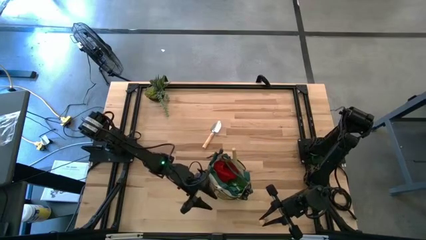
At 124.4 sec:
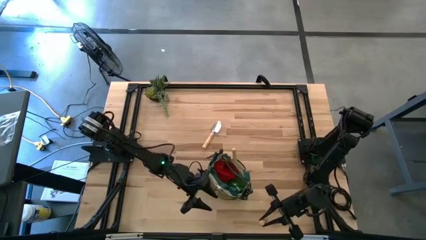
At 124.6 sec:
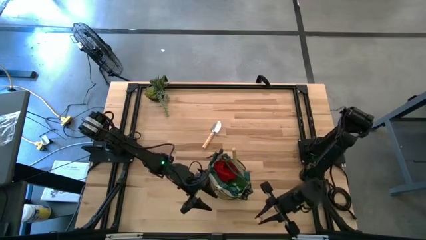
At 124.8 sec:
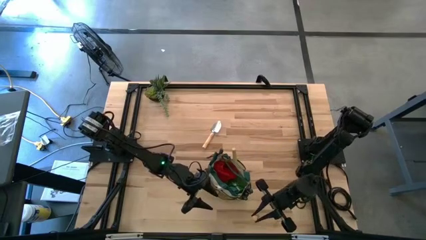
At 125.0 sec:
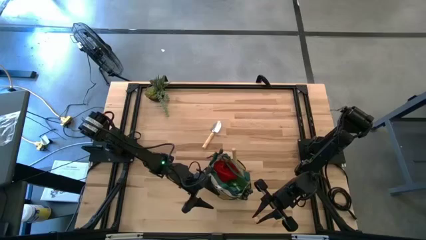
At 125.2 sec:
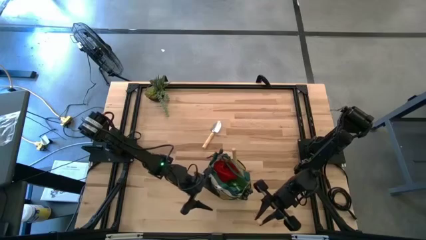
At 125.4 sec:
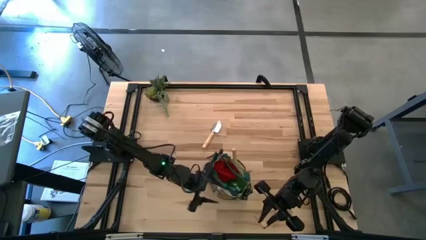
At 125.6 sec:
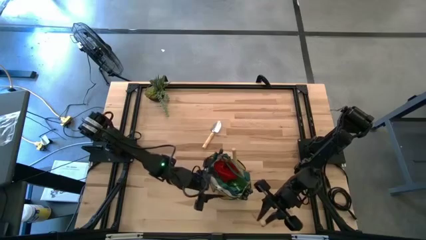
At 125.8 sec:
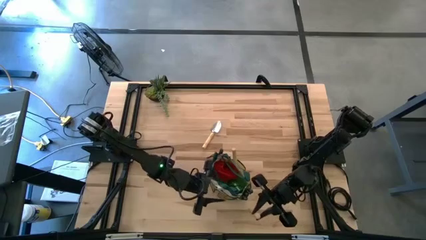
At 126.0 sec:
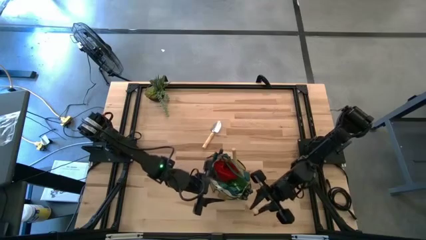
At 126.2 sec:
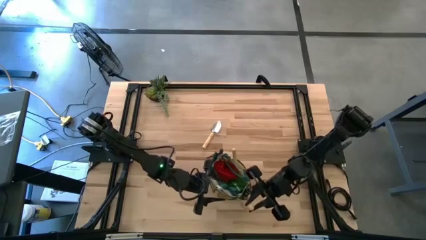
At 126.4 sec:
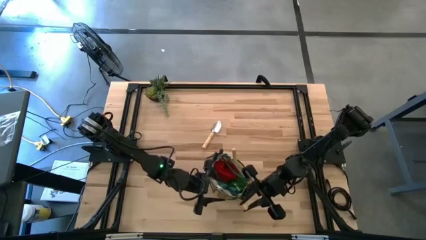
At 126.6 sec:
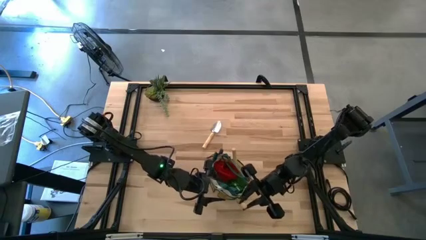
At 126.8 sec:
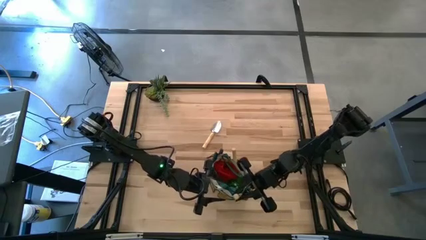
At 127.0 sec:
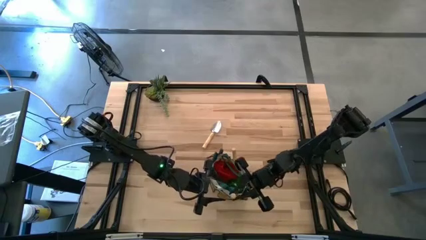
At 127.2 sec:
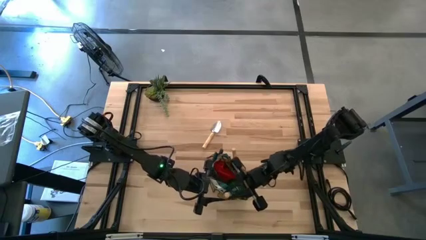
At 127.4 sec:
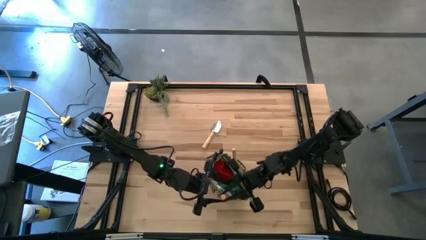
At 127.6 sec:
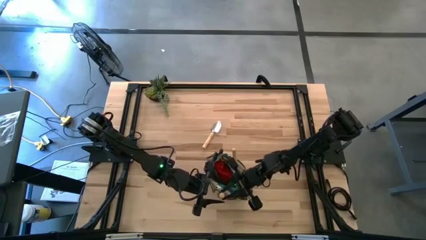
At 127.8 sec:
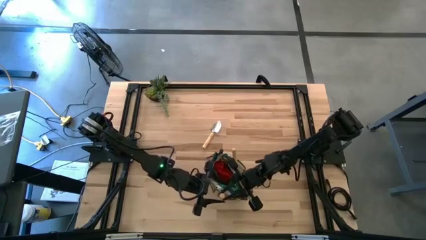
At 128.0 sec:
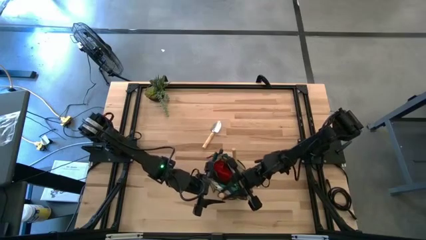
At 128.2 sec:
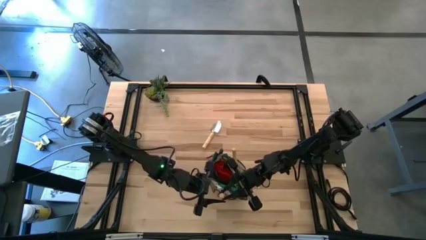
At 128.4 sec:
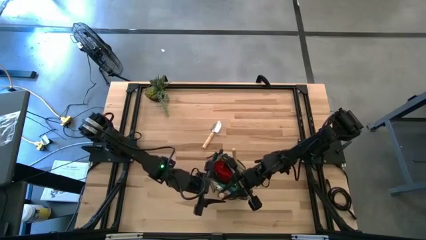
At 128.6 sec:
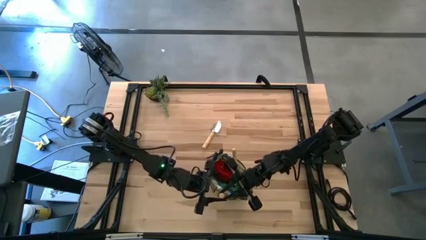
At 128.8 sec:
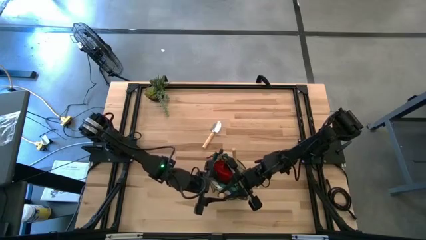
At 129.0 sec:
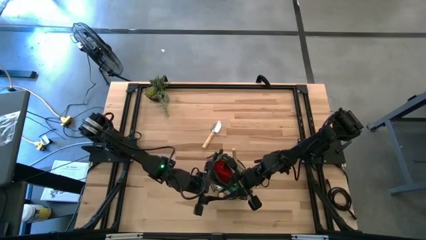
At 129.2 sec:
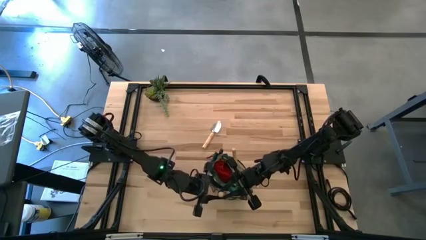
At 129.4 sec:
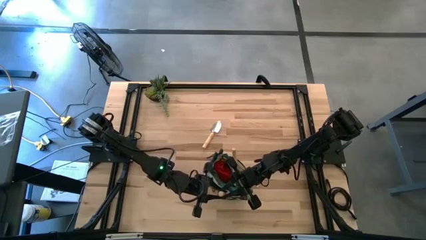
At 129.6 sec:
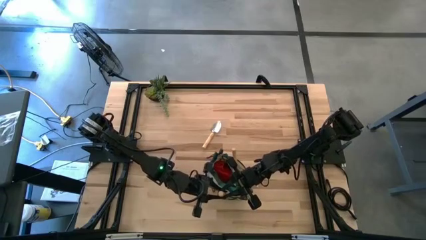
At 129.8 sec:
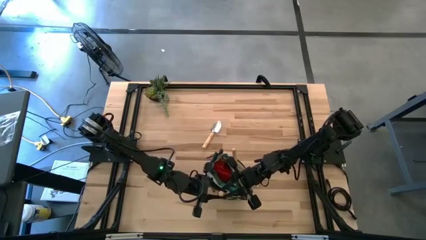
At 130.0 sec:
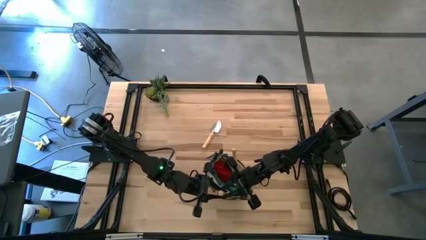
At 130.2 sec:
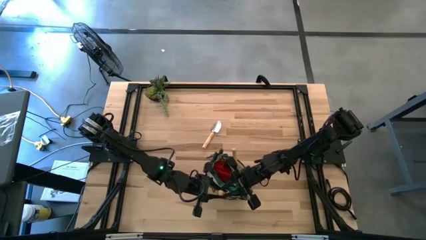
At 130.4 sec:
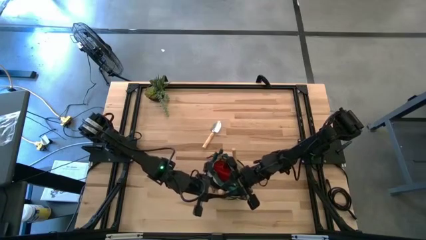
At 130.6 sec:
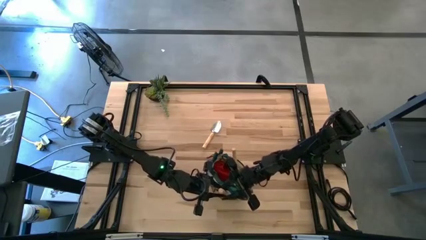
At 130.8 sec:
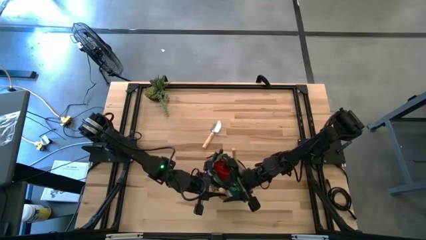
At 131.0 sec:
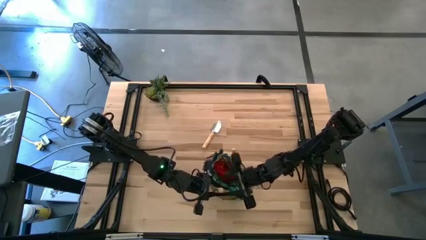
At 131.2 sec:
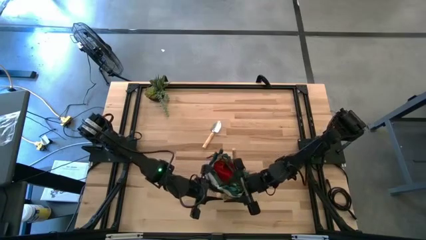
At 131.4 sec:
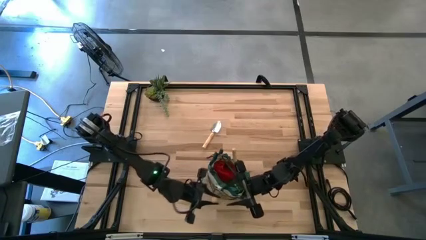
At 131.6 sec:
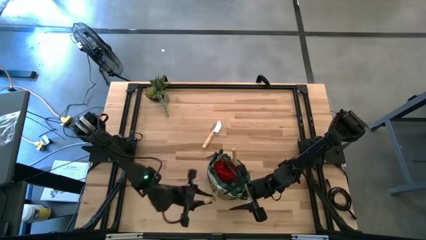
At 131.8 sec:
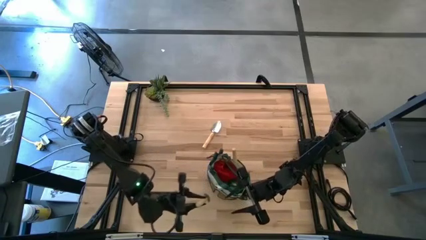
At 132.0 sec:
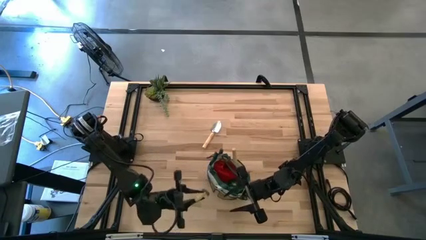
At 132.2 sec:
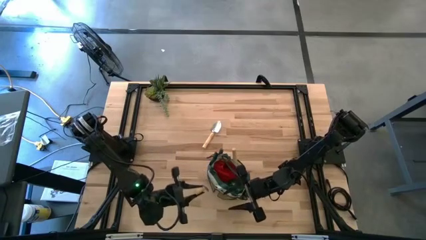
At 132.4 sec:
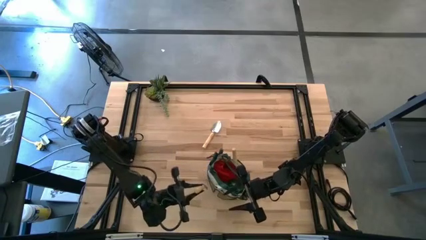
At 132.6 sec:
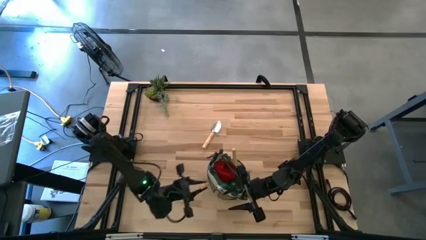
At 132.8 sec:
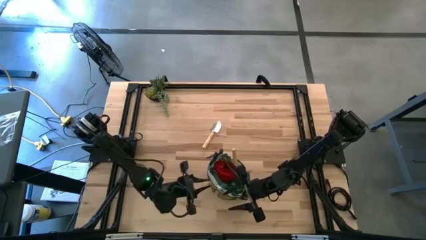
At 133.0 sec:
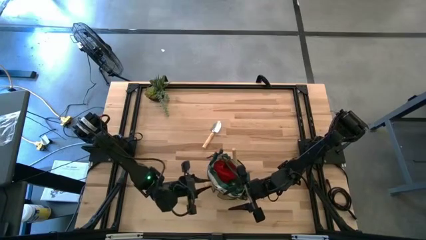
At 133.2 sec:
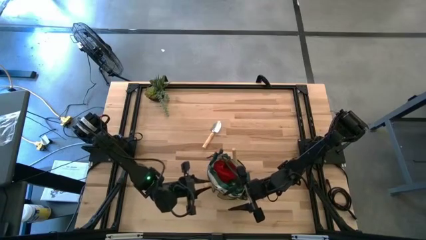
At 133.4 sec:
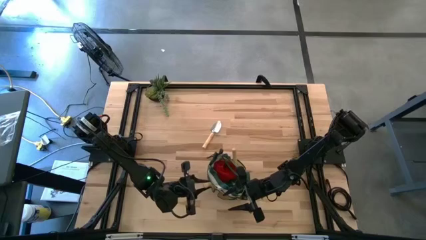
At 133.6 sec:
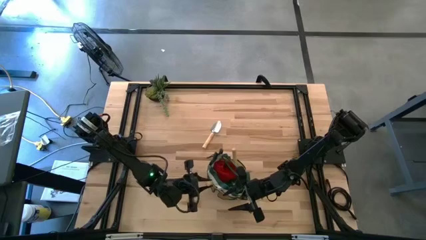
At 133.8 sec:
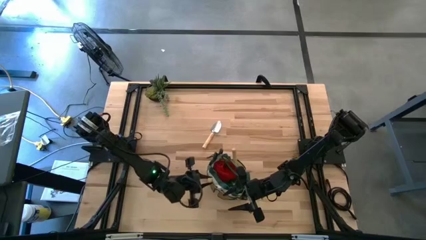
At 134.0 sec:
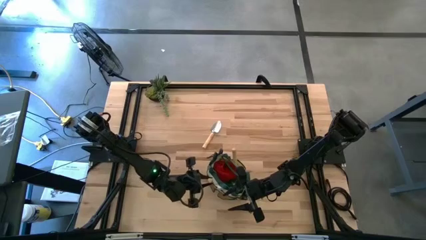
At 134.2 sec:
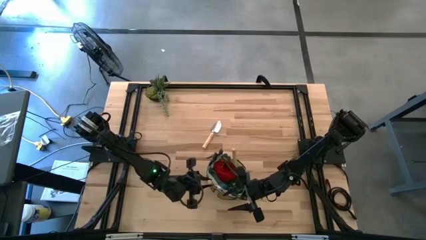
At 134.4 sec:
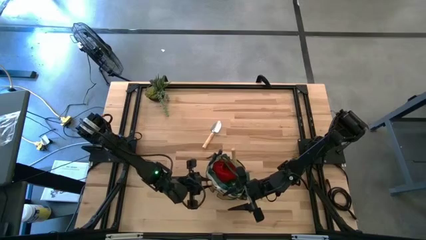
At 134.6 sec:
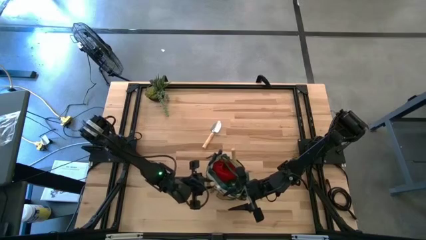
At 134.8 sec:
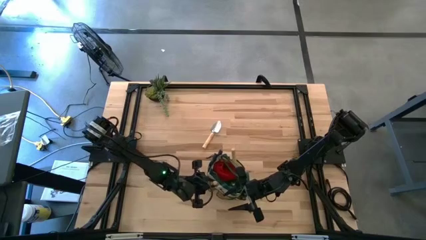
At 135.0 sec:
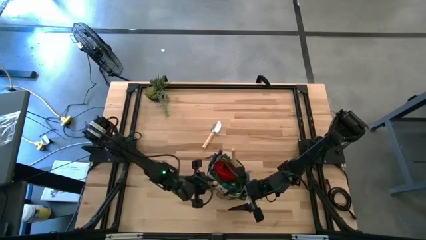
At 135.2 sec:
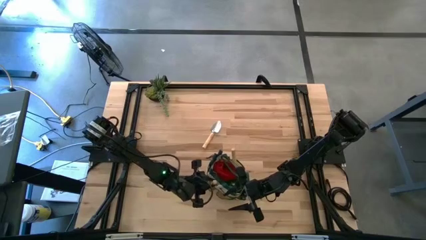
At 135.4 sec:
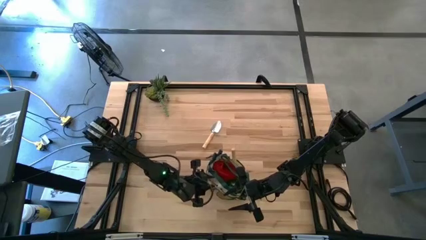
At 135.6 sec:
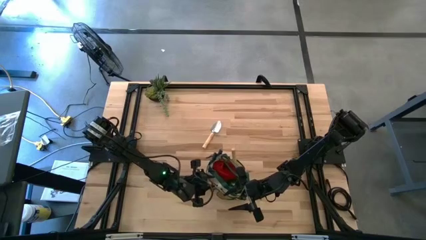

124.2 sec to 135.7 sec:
Task: Pick & Place Garden tools in Gardening bag
Put the right trowel into the light brown gardening bag

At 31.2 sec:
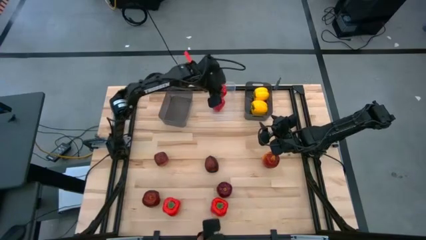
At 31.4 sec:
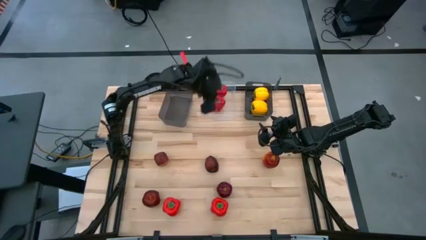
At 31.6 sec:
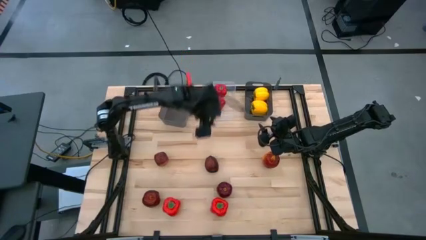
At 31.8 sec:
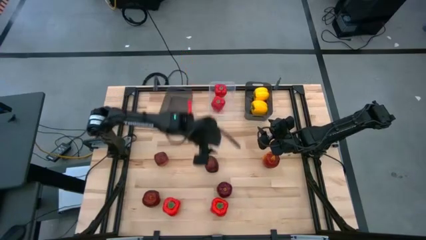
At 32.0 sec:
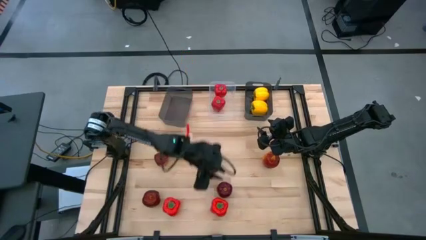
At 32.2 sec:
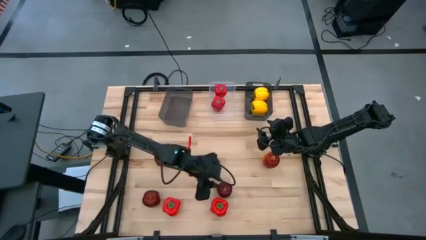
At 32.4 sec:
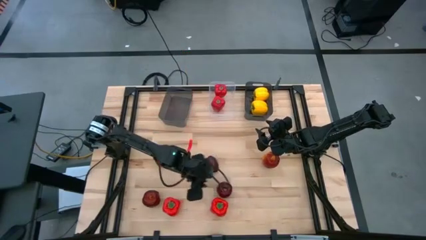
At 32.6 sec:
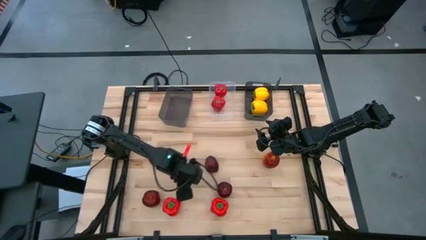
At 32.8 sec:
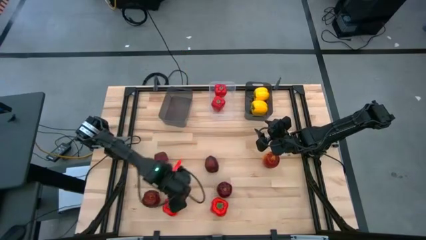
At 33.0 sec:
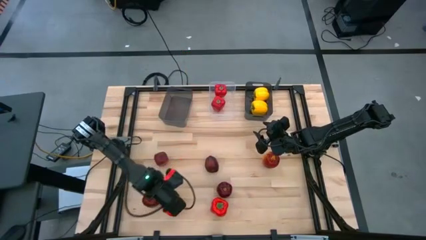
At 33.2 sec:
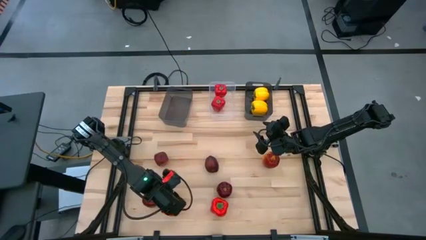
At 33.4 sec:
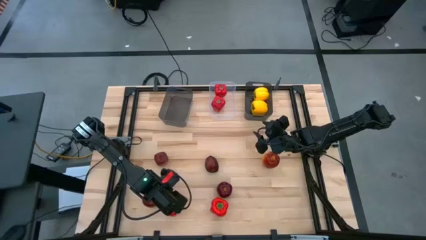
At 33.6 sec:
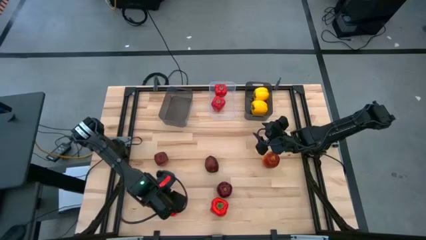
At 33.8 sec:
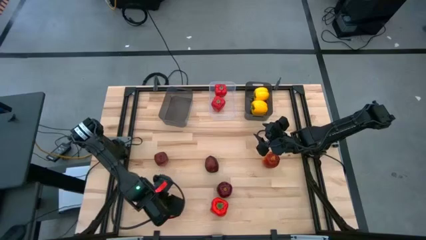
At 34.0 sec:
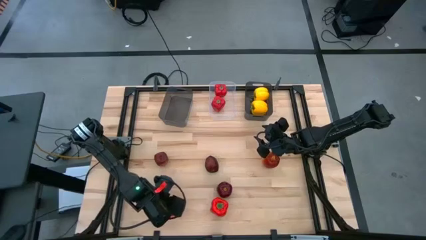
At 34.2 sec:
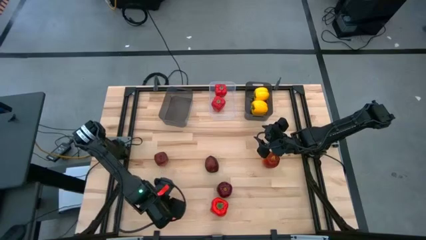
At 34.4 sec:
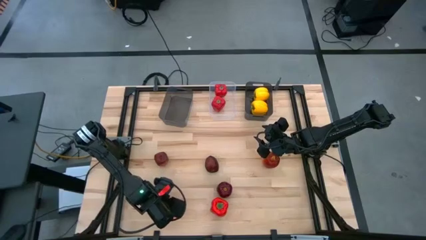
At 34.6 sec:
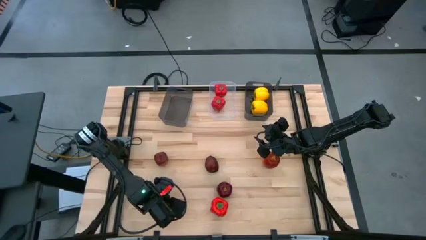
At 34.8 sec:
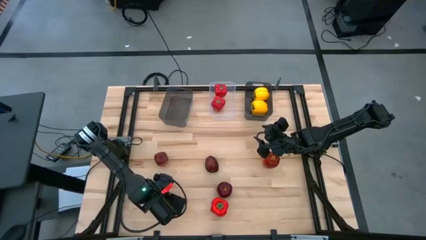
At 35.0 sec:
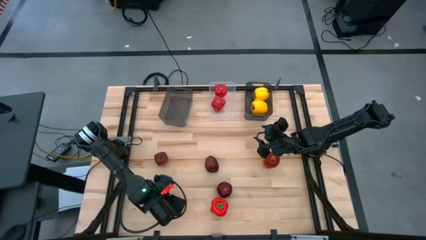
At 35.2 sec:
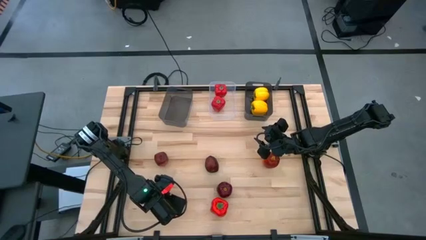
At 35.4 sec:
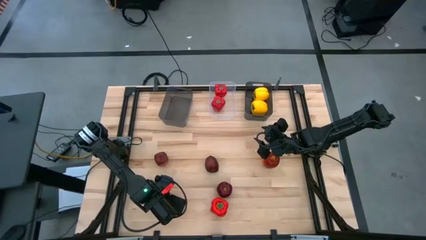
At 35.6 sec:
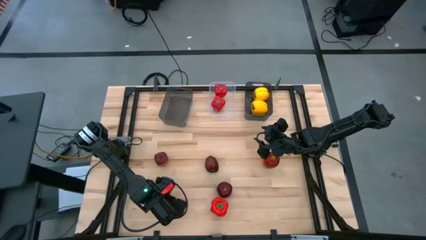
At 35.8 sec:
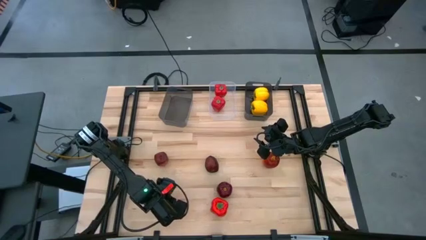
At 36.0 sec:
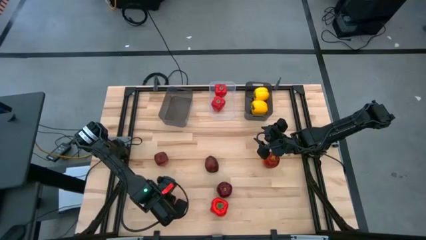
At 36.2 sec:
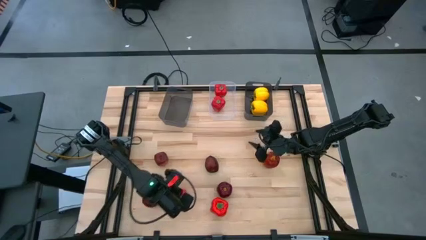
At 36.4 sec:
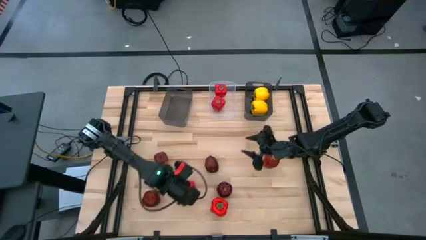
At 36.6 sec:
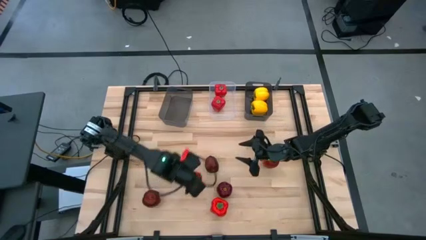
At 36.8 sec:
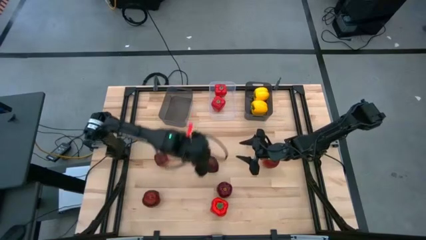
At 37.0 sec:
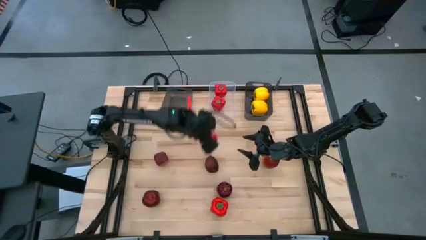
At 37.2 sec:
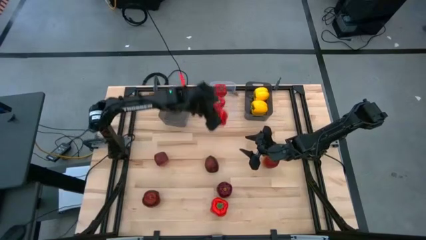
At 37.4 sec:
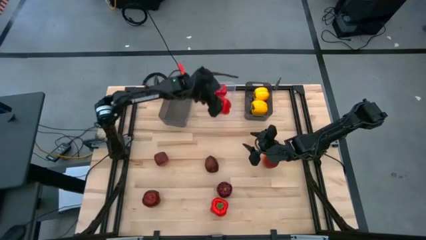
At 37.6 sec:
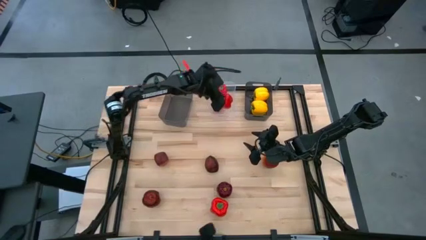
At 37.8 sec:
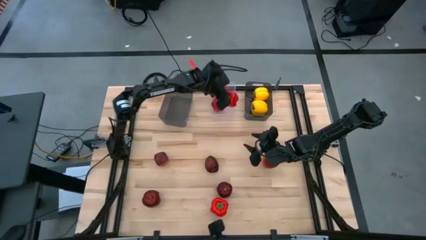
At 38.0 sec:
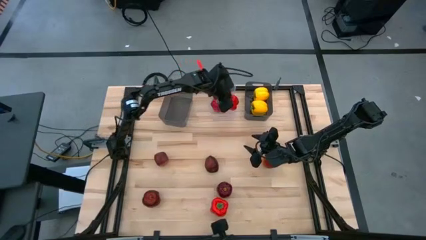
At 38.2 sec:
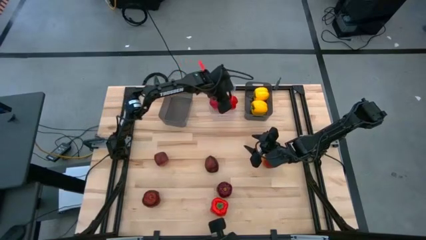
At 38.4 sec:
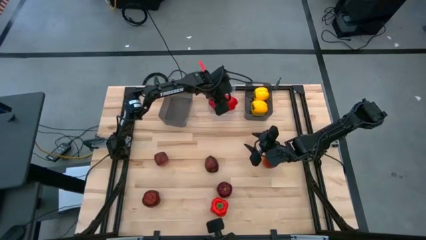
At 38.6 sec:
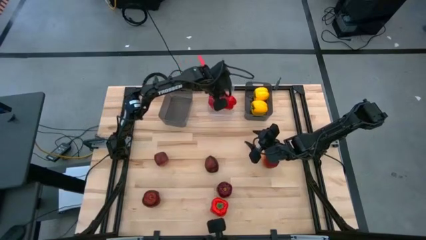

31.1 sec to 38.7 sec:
Task: Sort produce into baskets
Put the left red bell pepper into the transparent bin
